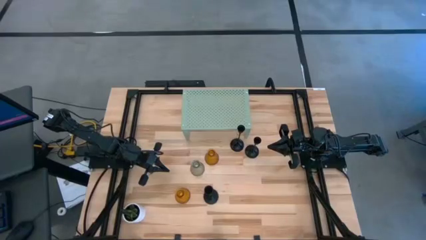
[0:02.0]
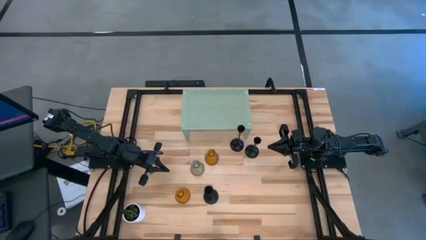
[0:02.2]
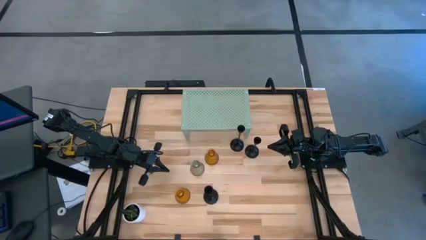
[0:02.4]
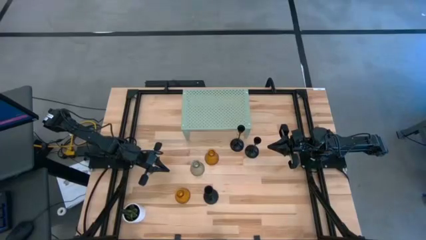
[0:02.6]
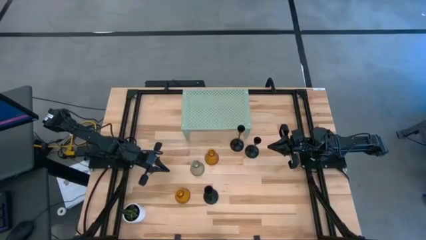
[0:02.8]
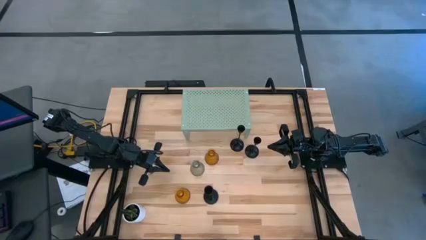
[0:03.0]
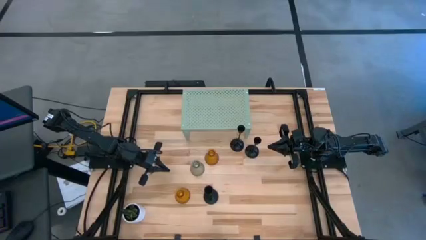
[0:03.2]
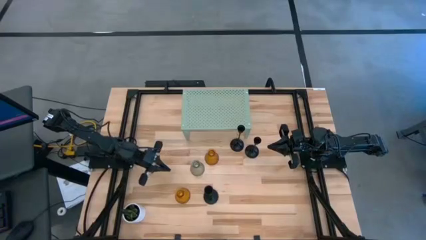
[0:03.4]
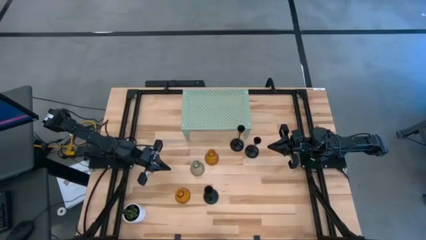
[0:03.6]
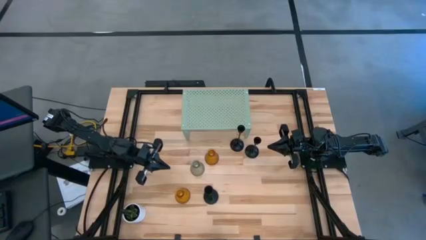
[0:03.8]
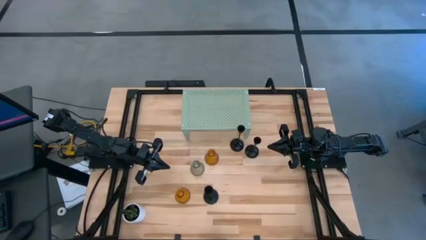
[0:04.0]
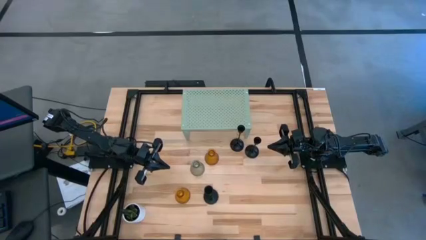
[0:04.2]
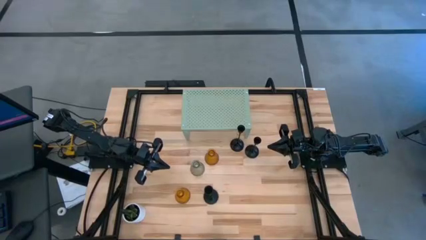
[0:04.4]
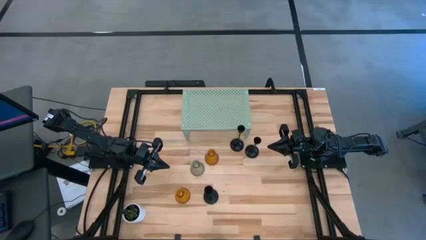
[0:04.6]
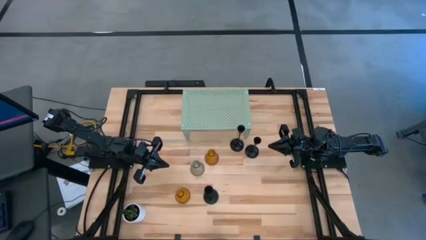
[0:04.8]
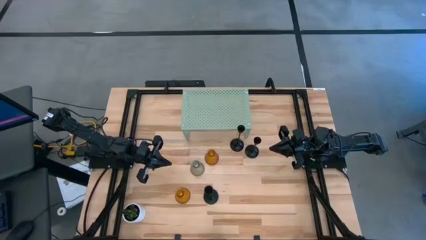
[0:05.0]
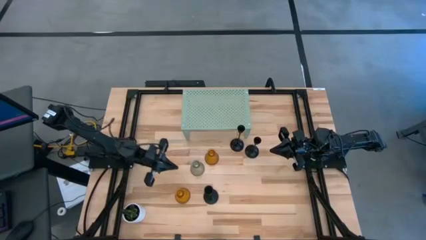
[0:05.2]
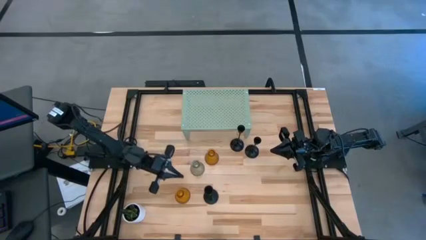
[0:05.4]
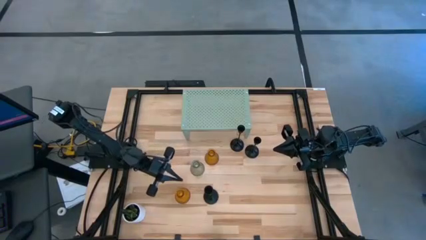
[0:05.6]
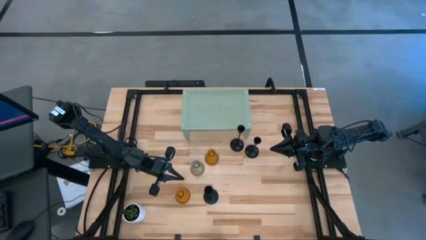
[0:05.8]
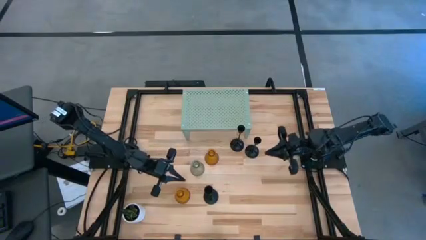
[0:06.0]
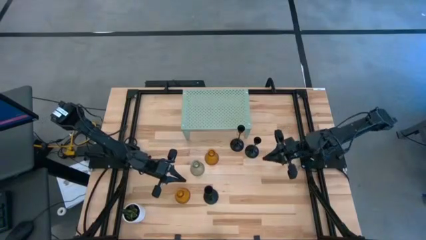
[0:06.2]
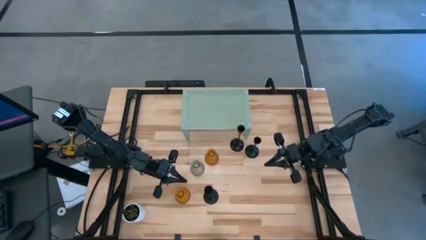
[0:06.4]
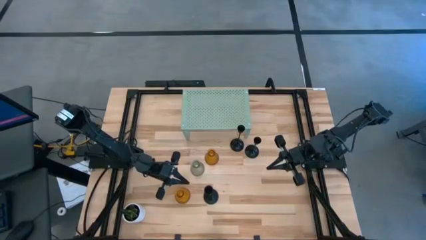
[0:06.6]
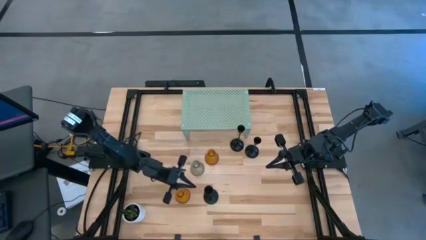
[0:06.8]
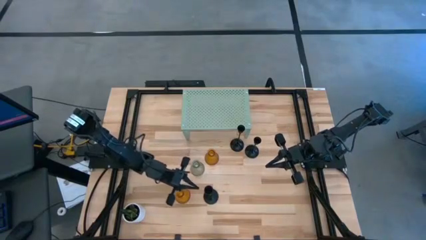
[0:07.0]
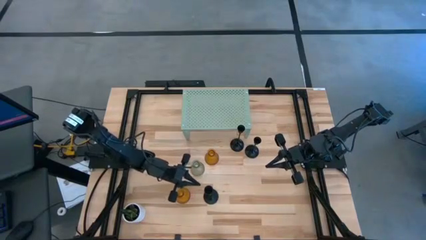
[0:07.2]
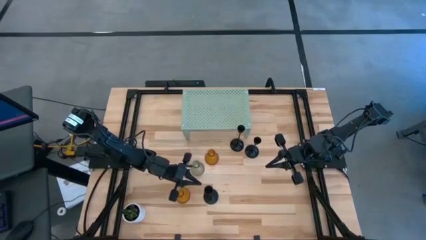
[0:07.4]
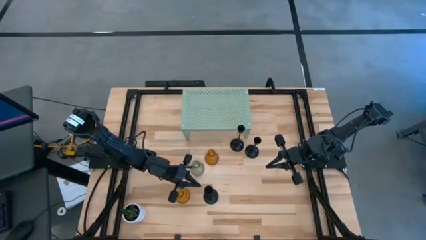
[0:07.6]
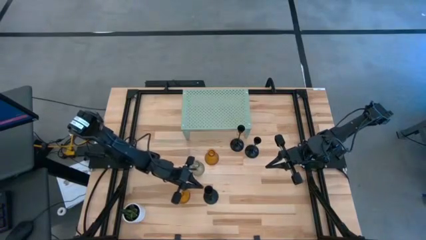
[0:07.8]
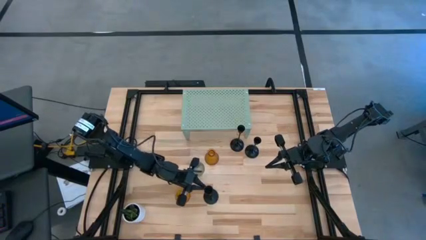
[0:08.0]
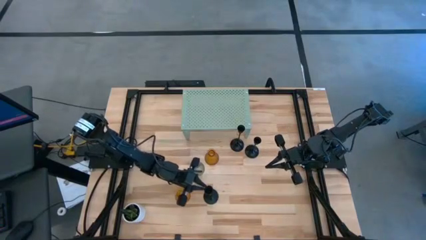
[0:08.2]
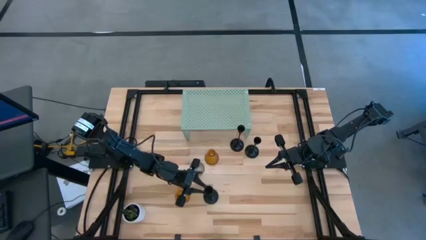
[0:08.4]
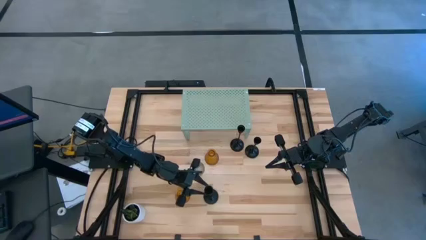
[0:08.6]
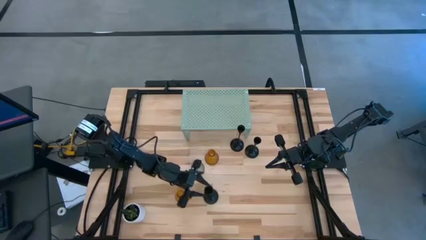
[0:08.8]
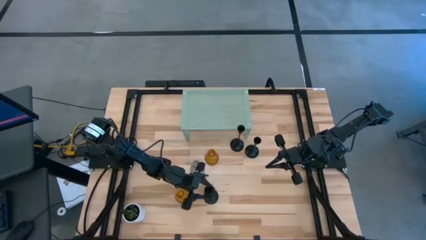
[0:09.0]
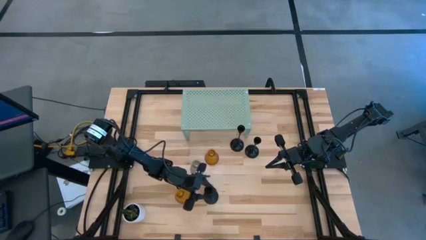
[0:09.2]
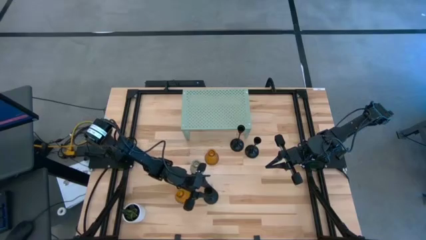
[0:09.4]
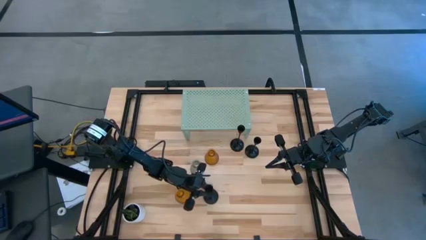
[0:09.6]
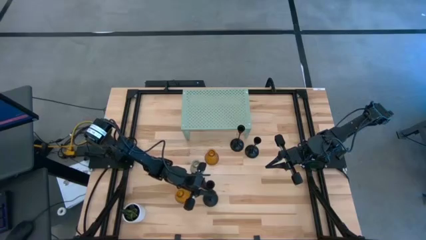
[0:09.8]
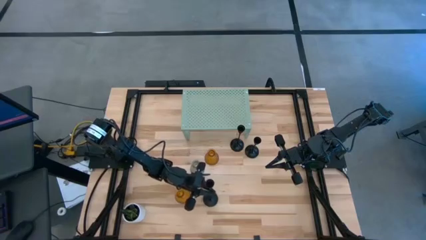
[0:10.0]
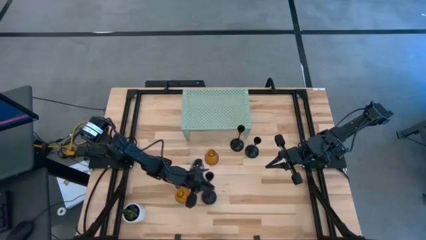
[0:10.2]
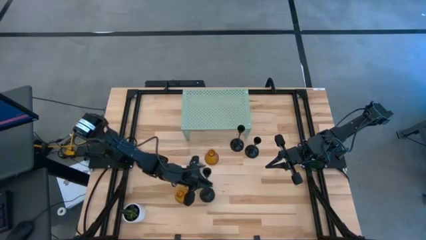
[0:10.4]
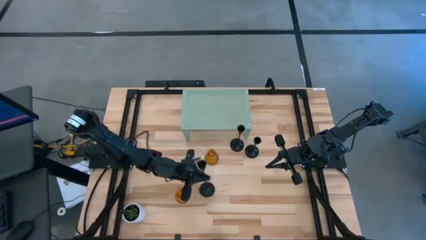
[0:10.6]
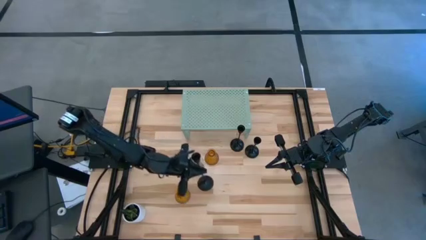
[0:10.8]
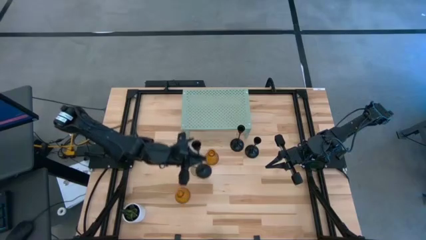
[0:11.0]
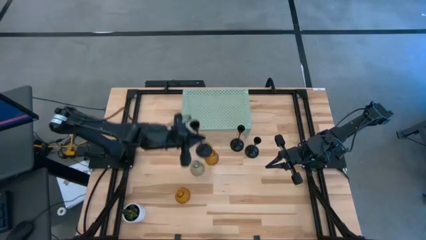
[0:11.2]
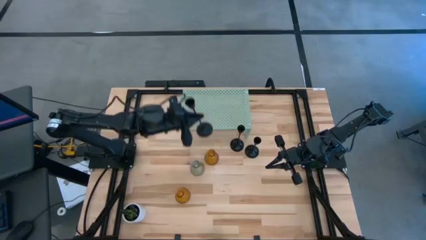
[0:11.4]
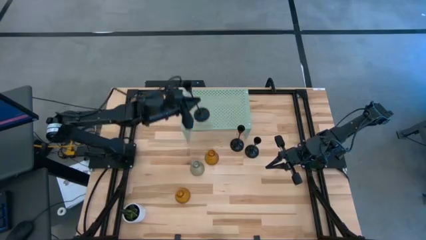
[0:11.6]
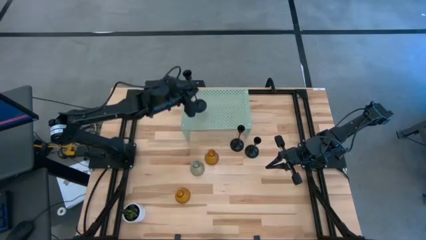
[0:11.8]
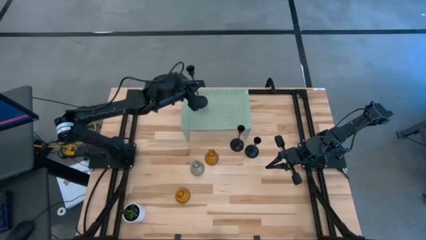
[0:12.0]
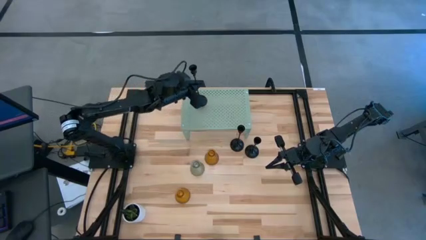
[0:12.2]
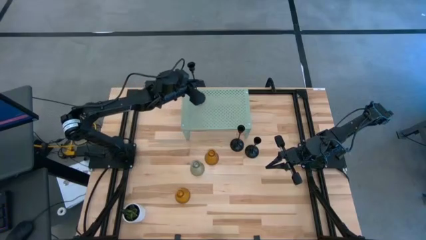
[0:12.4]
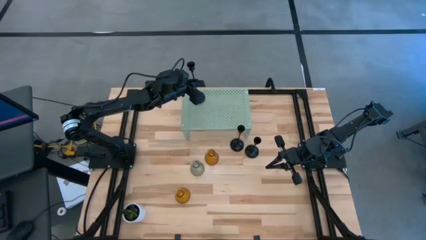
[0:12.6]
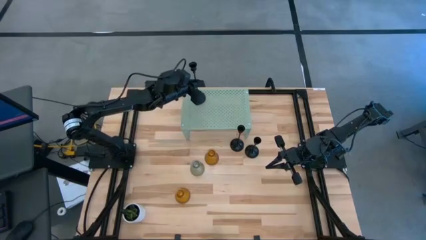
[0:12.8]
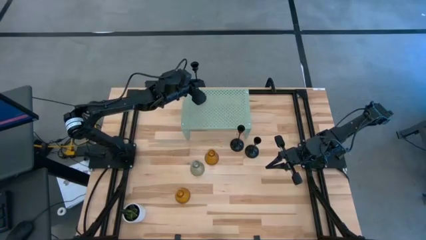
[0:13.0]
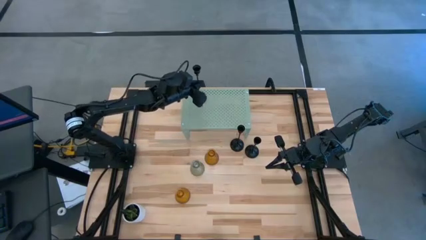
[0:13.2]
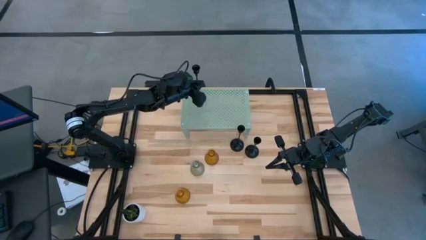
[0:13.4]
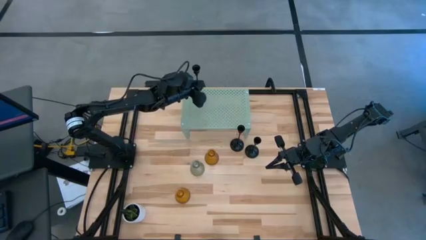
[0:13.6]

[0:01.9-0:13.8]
Task: Pick & Place candle stick holders
Put the bottom black candle holder on the shelf

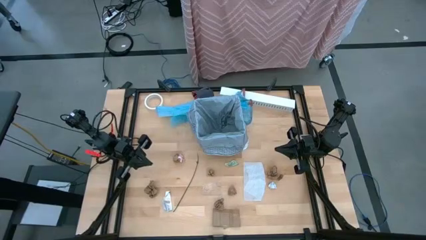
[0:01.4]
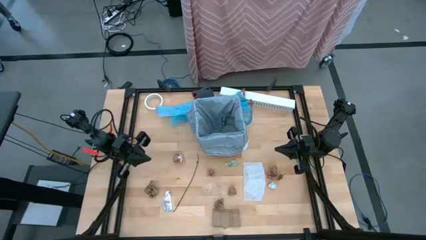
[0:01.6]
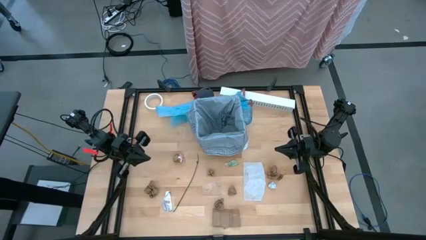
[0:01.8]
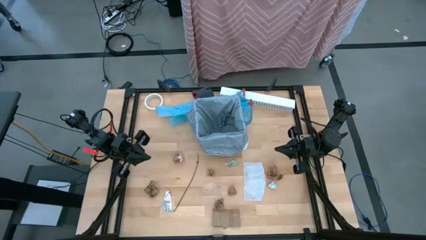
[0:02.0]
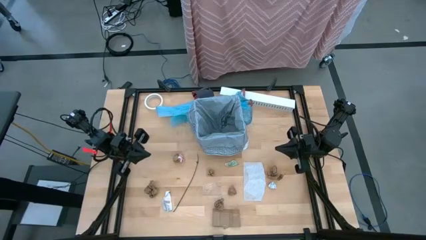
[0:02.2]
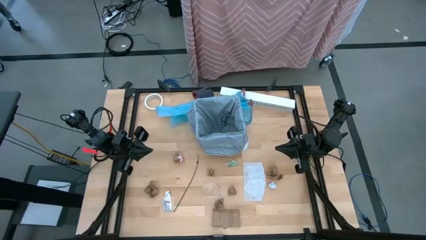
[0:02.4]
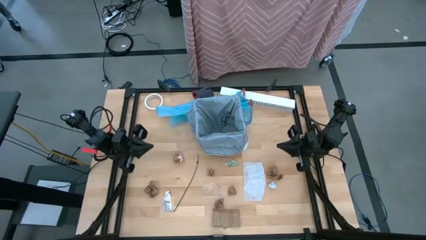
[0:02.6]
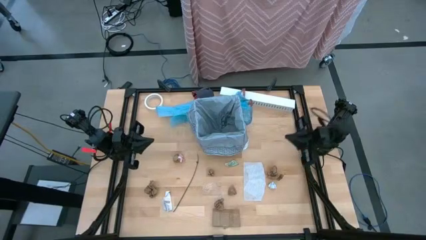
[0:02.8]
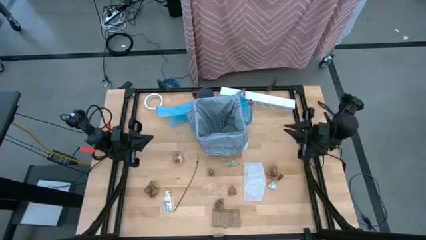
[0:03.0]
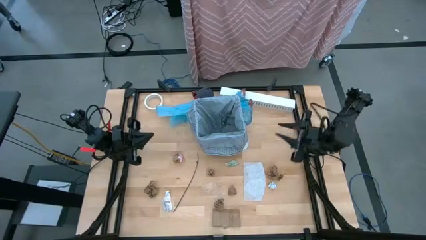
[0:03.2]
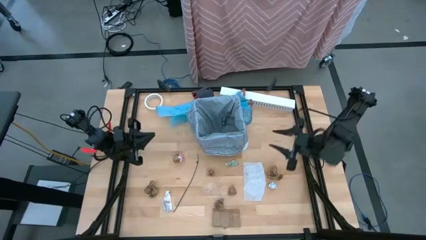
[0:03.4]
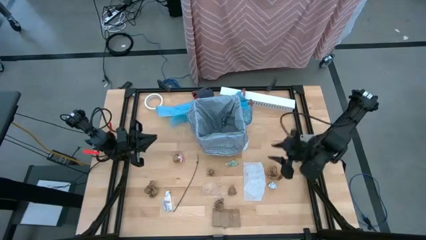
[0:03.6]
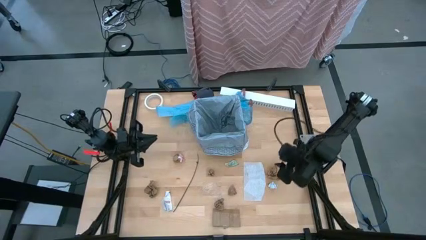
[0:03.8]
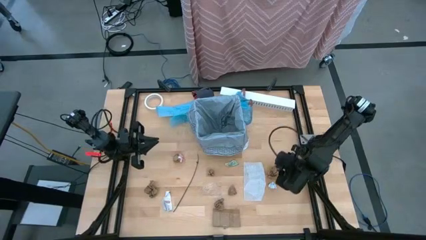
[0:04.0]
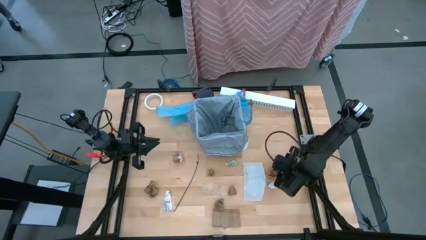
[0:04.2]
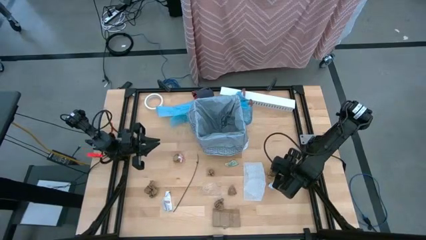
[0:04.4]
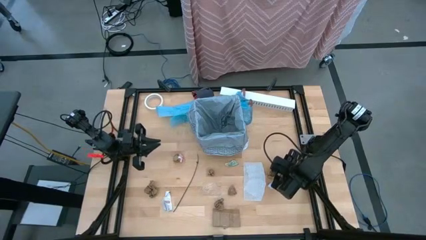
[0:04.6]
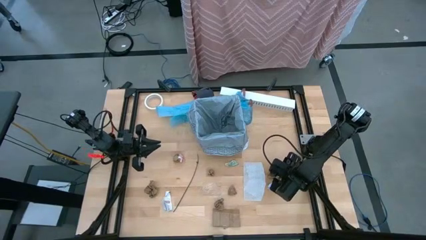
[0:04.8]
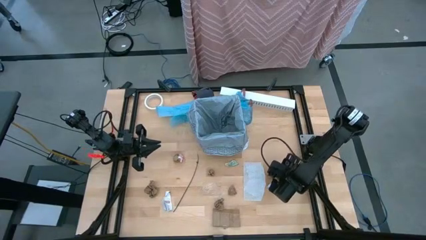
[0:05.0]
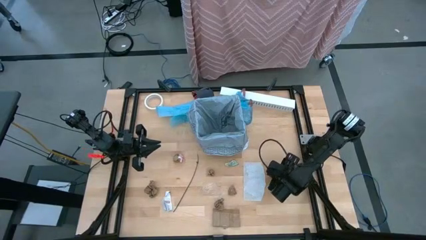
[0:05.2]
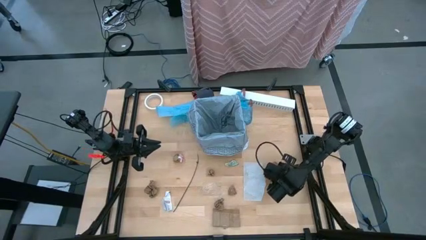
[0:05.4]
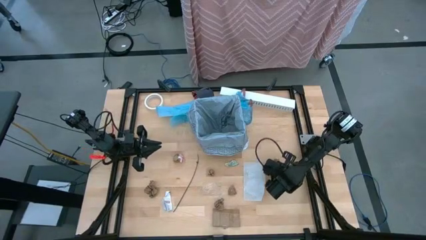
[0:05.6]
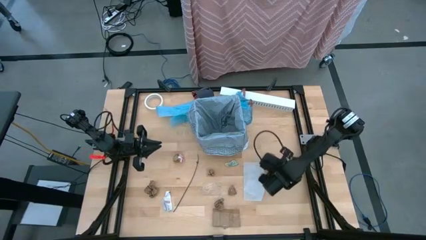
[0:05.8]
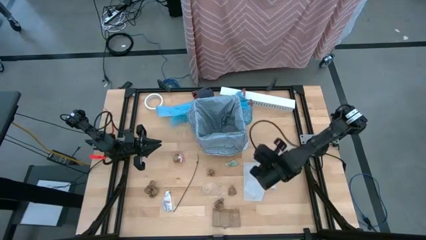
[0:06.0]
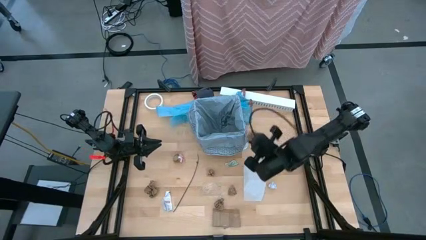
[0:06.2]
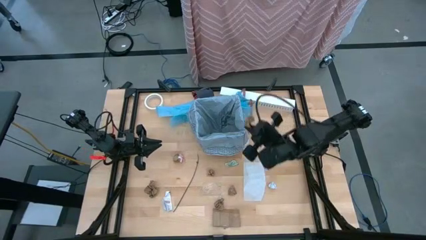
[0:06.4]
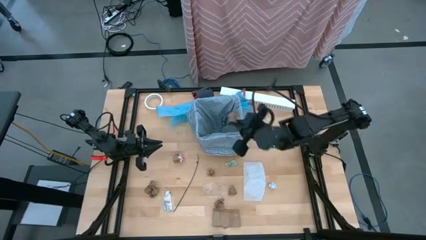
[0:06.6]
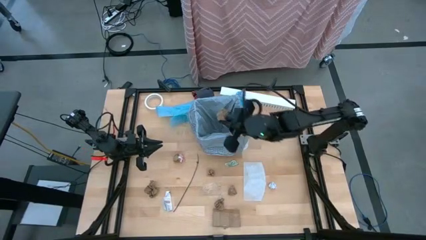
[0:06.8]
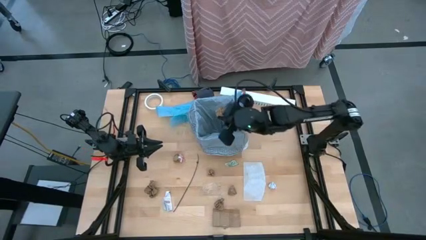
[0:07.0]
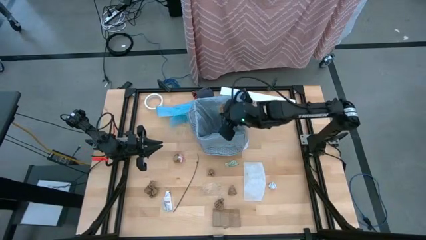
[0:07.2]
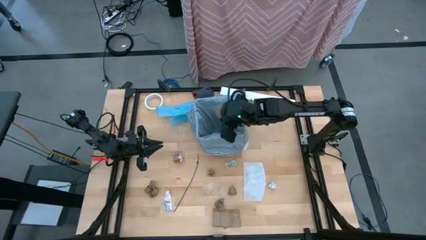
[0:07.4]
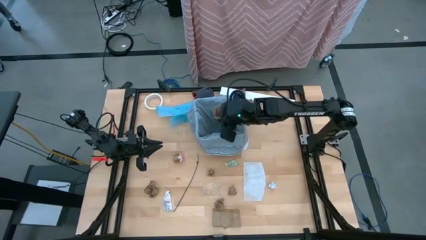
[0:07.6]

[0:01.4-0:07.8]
Task: place trash/remove bag and relplace
Put the brown napkin inside the black trash bin
